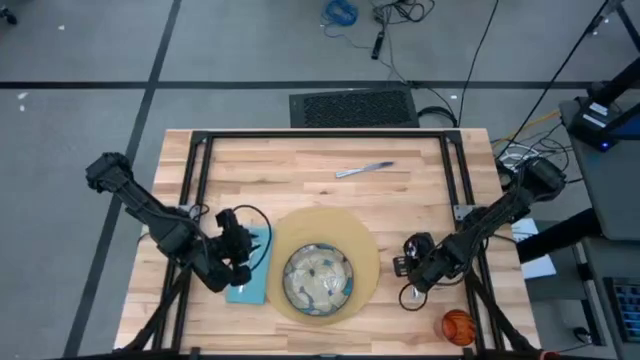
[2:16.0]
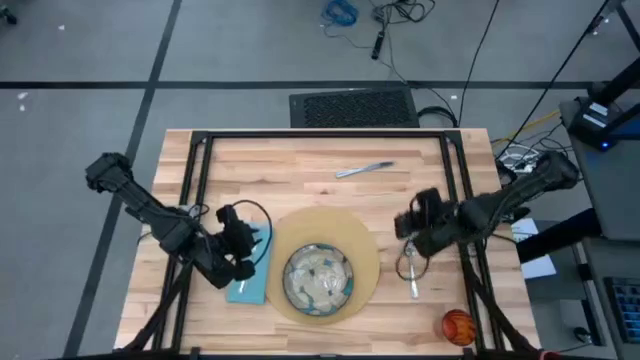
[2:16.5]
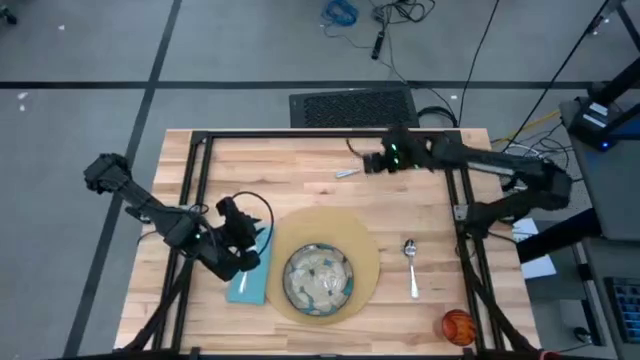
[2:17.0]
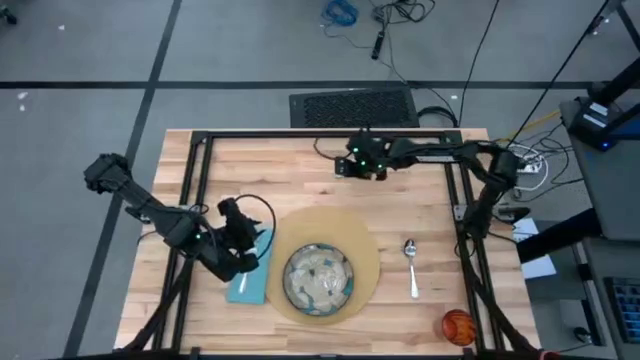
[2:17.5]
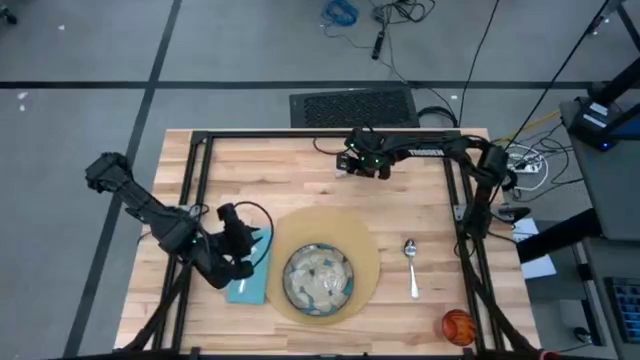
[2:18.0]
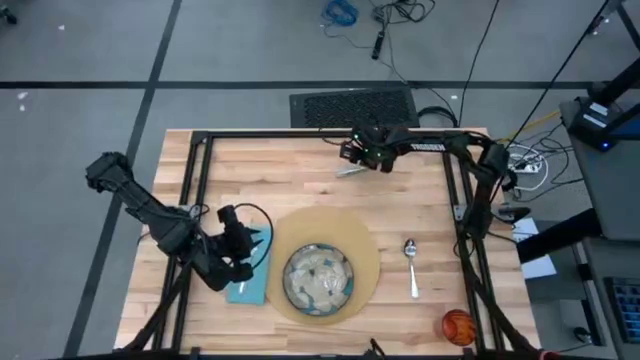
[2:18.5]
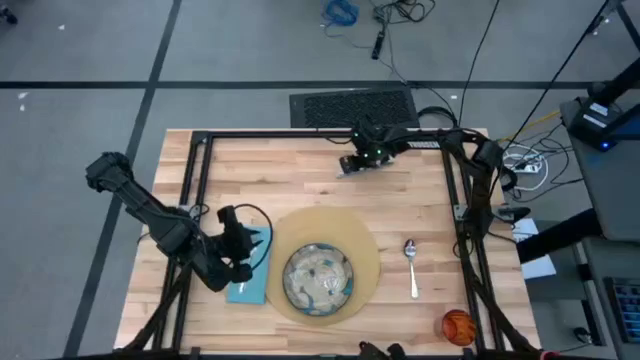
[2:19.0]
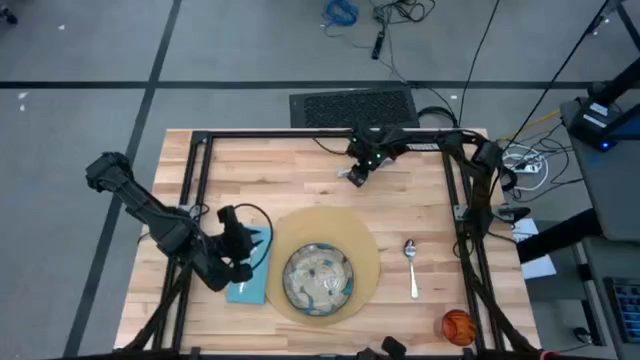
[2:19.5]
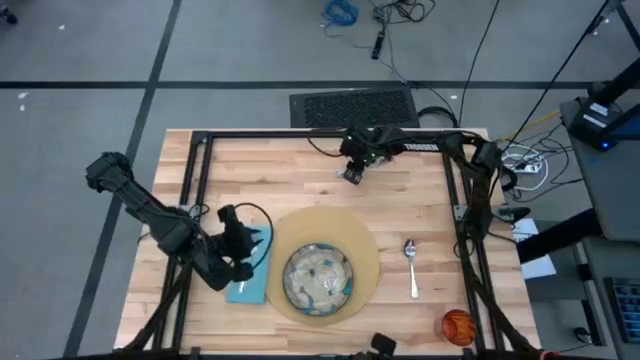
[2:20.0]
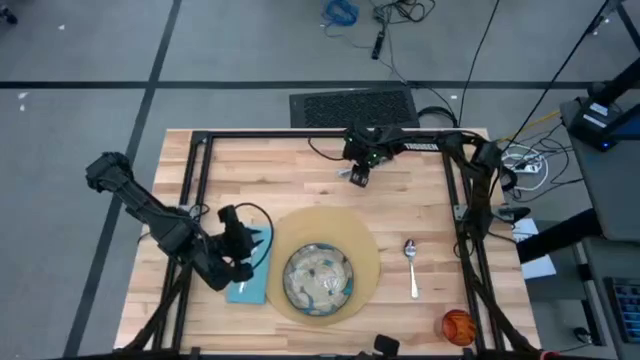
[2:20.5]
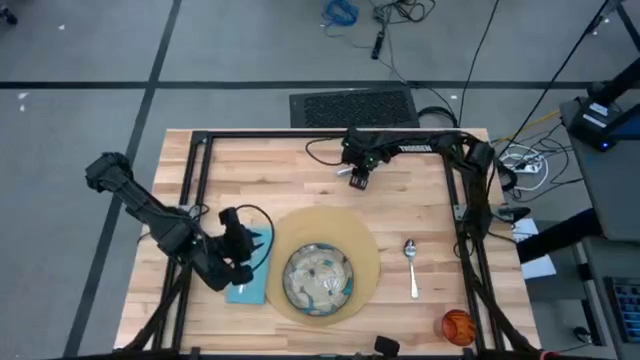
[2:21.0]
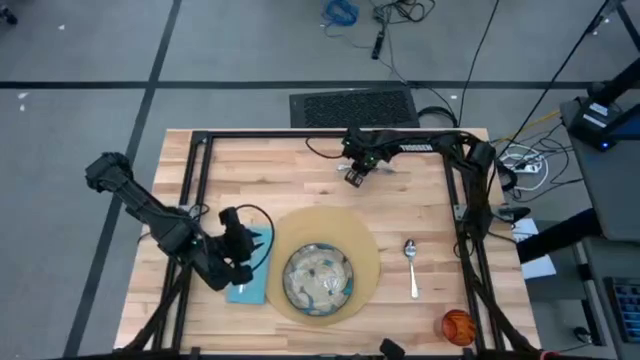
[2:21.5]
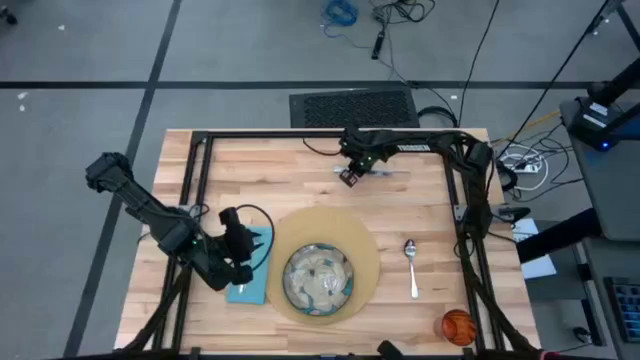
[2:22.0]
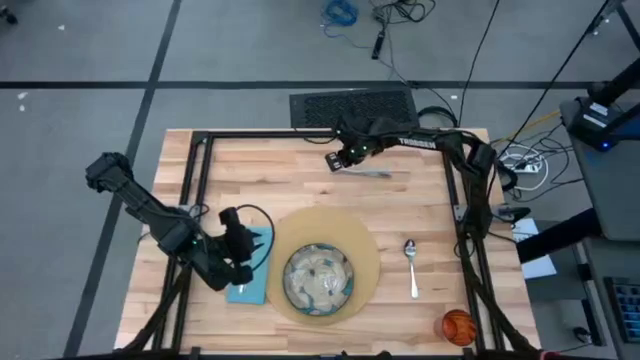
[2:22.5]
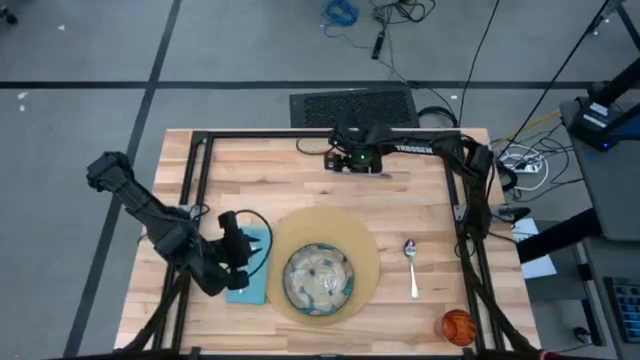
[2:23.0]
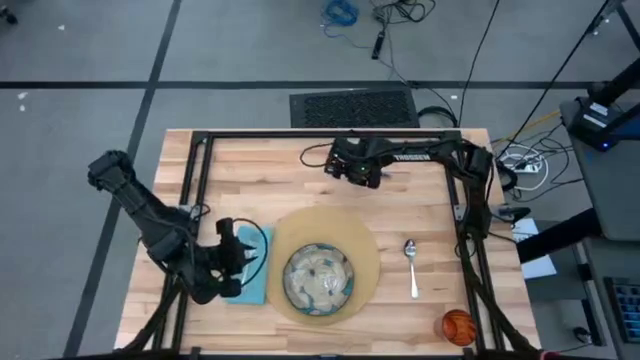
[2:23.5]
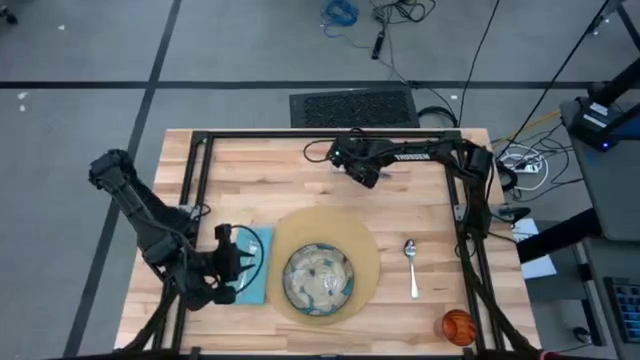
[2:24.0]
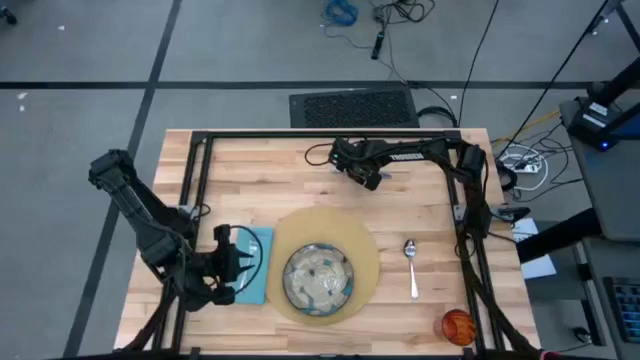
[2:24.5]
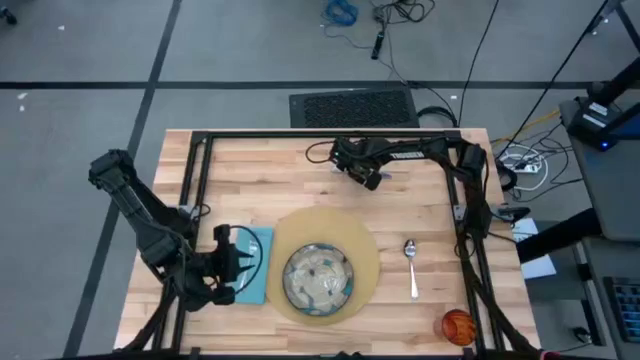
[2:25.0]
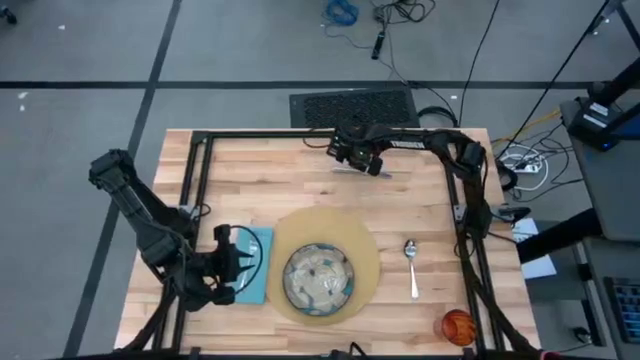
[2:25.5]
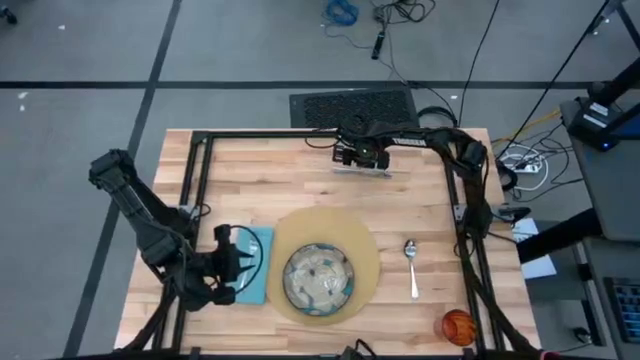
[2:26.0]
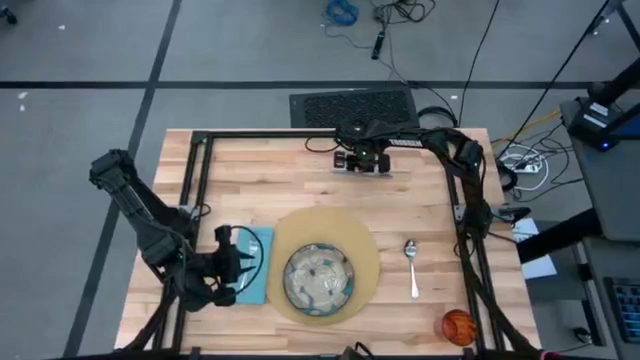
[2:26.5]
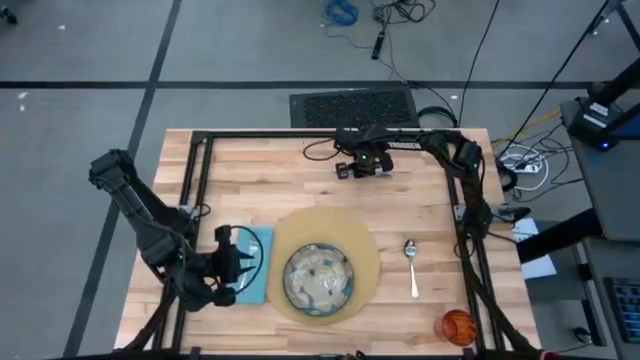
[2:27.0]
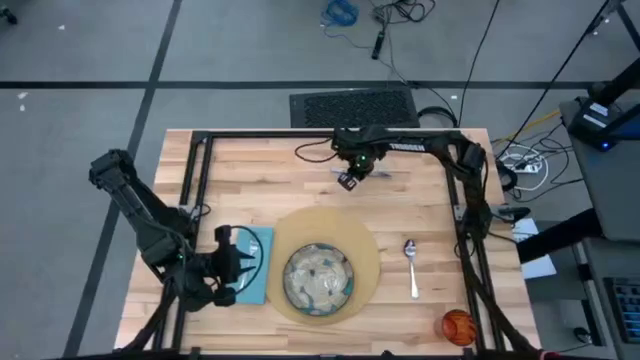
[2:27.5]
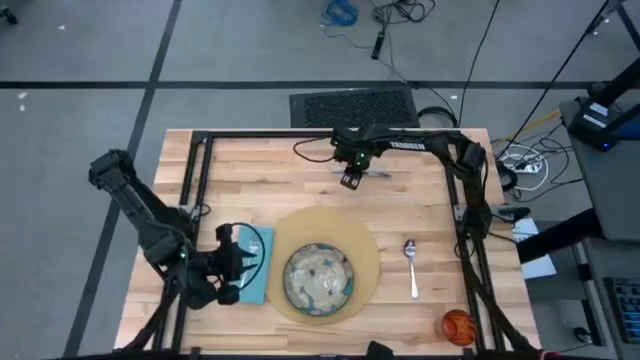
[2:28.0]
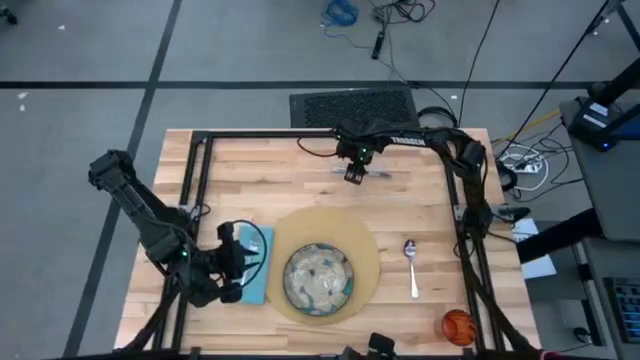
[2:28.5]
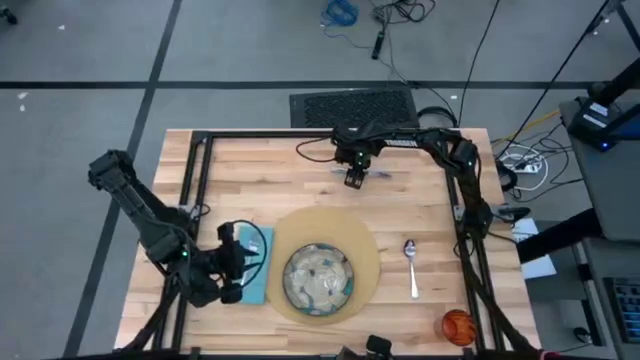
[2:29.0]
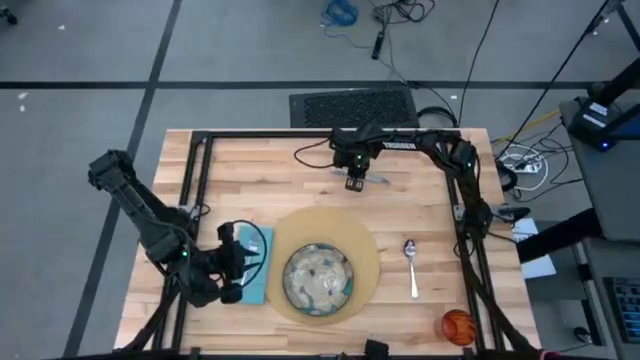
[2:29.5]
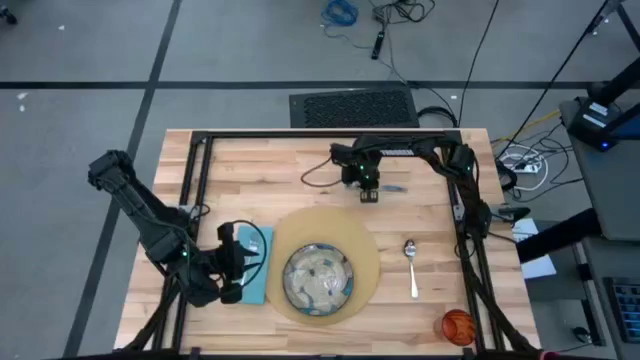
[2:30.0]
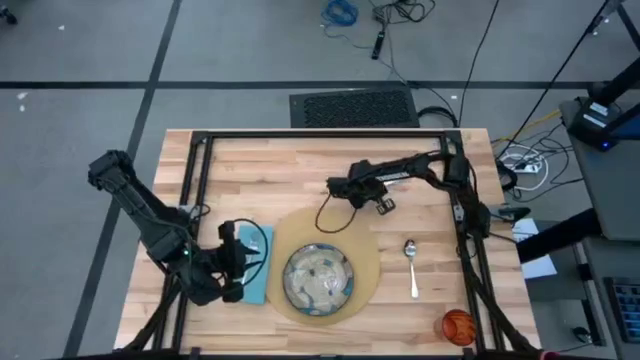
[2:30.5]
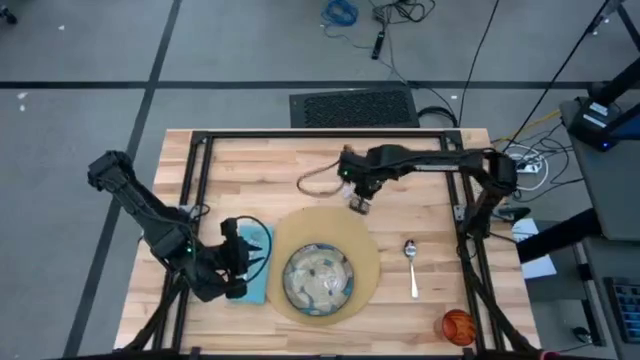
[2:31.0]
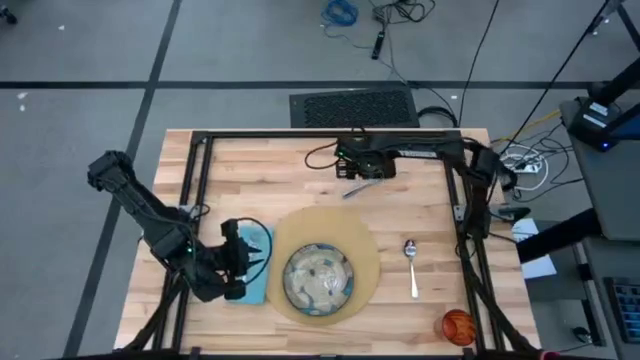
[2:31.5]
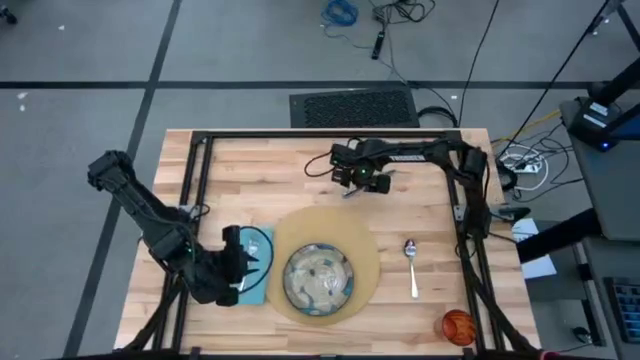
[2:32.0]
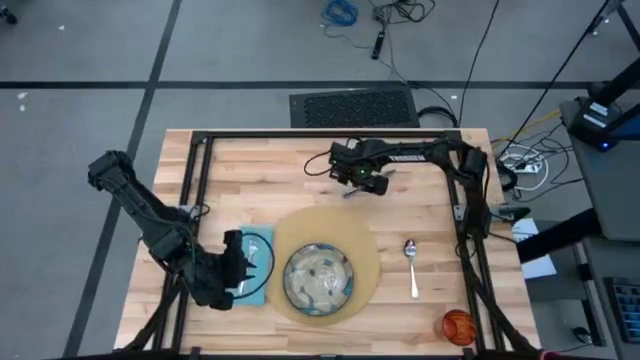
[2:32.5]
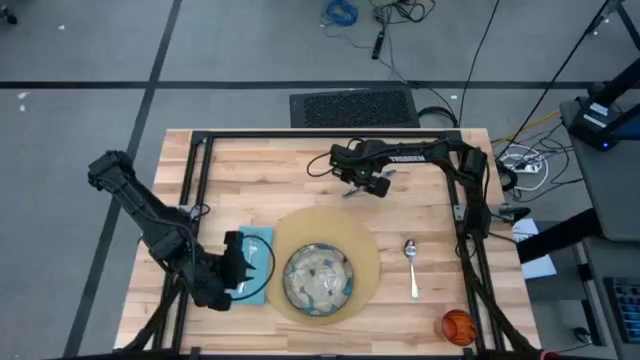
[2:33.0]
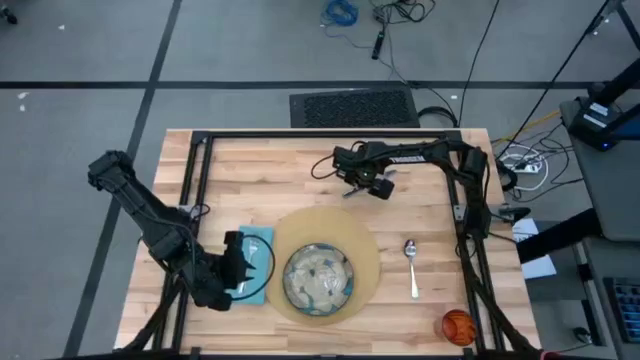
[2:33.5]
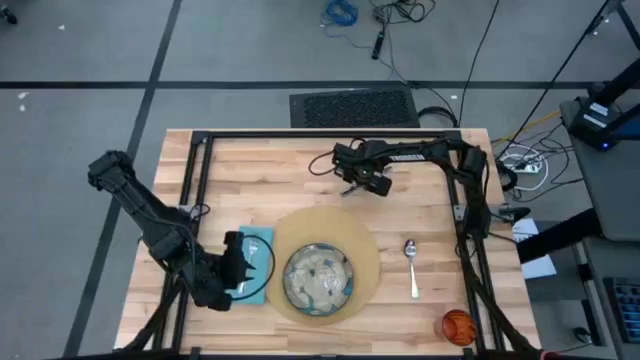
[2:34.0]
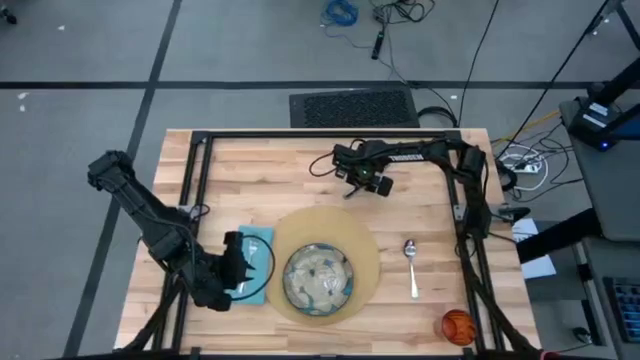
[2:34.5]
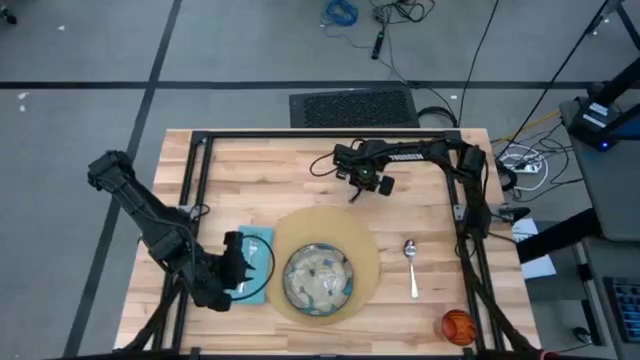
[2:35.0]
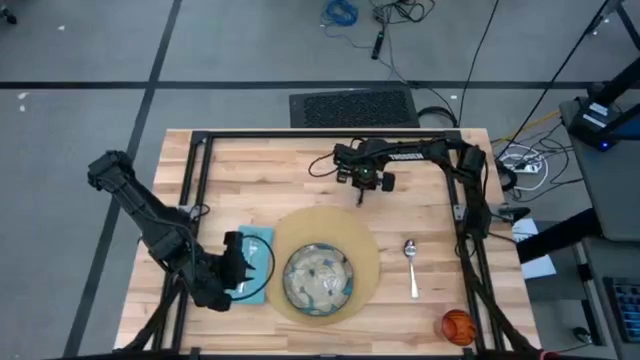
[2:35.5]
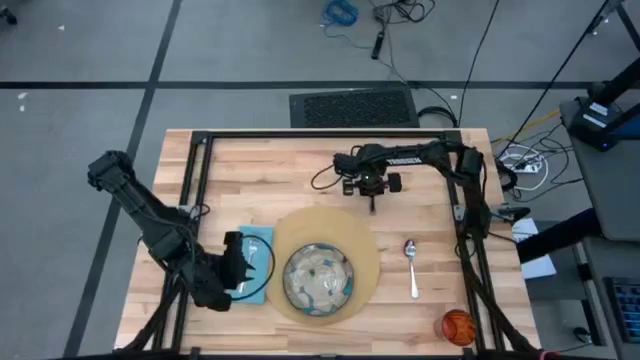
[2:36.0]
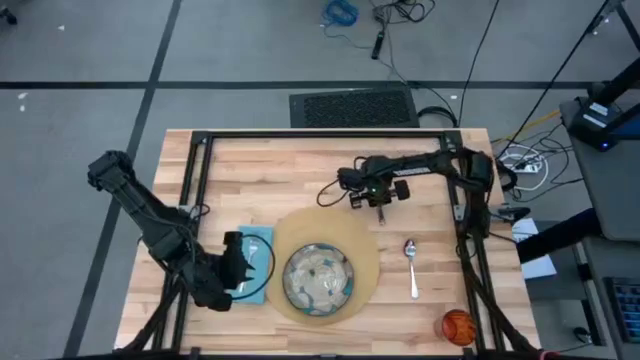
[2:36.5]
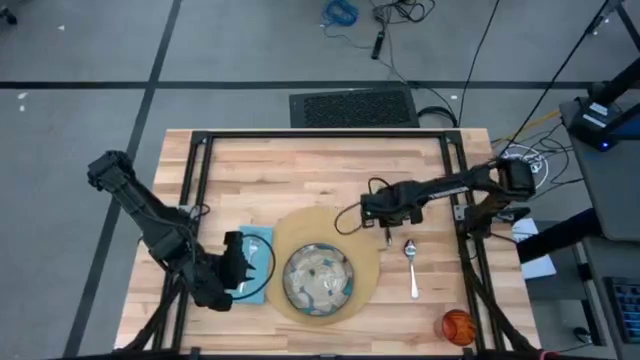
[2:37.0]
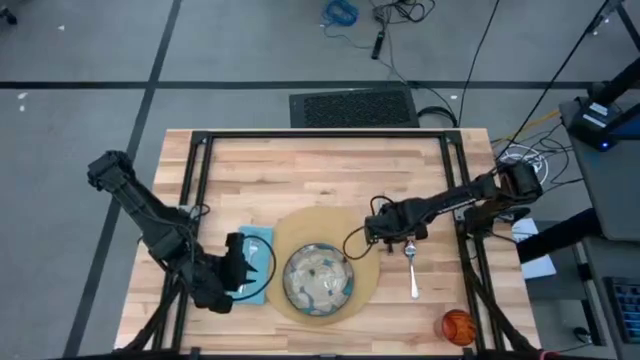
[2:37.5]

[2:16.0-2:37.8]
Task: Set table place
Move the silver knife to the right of the brown mat
